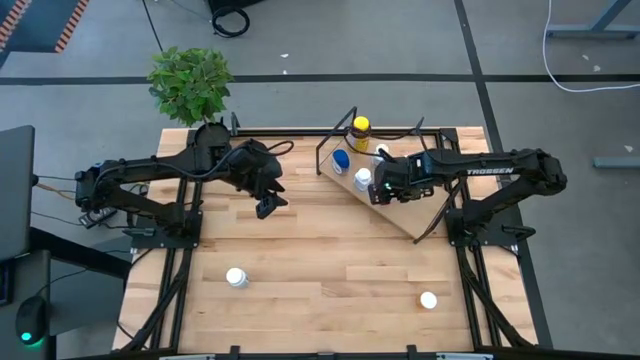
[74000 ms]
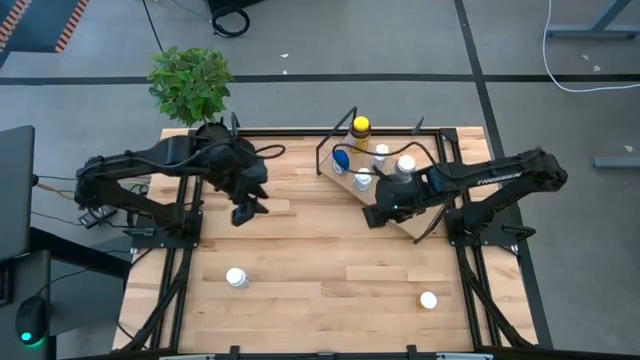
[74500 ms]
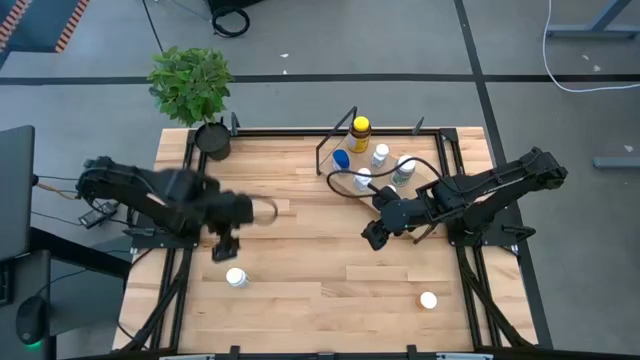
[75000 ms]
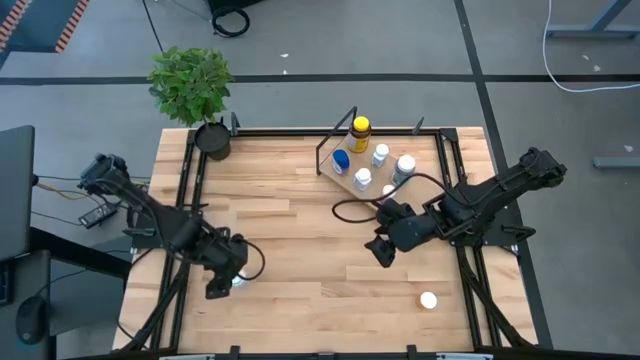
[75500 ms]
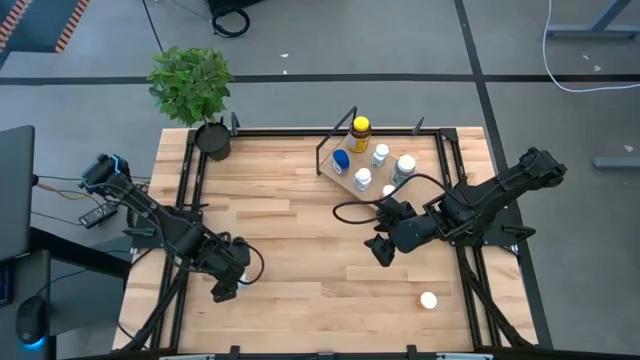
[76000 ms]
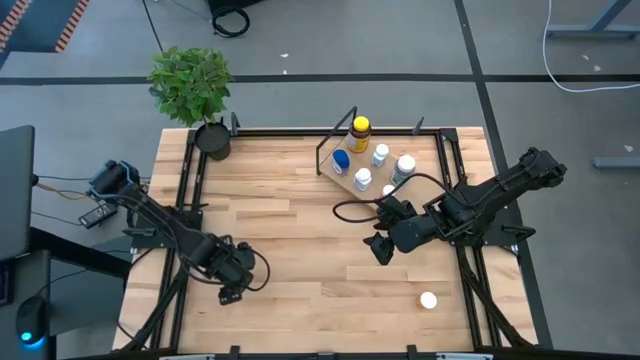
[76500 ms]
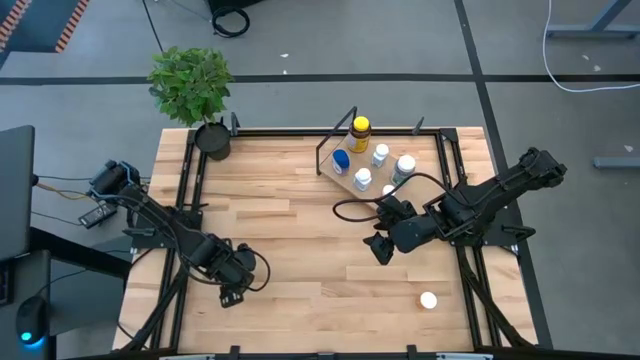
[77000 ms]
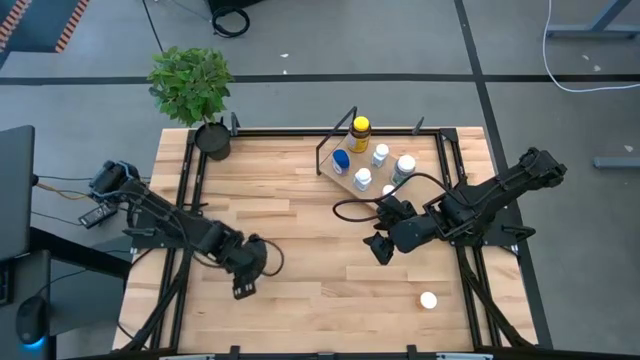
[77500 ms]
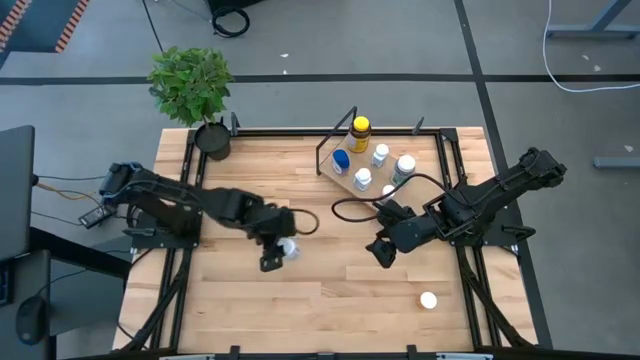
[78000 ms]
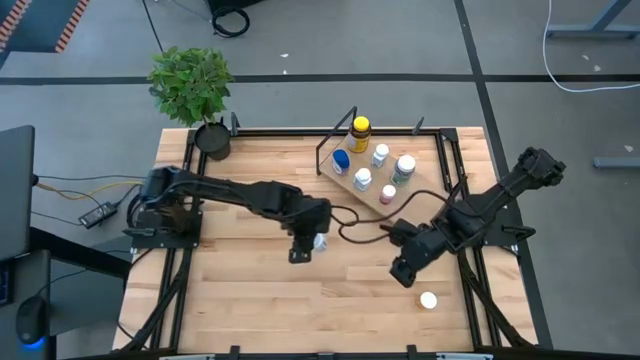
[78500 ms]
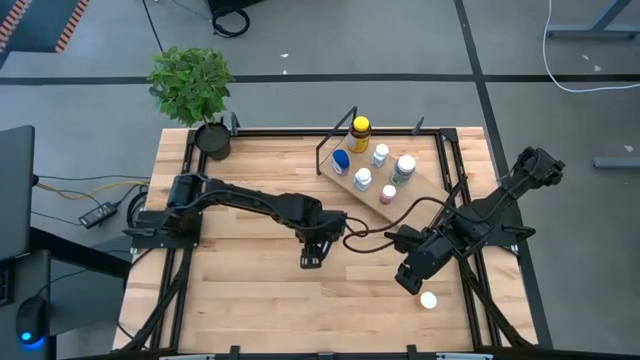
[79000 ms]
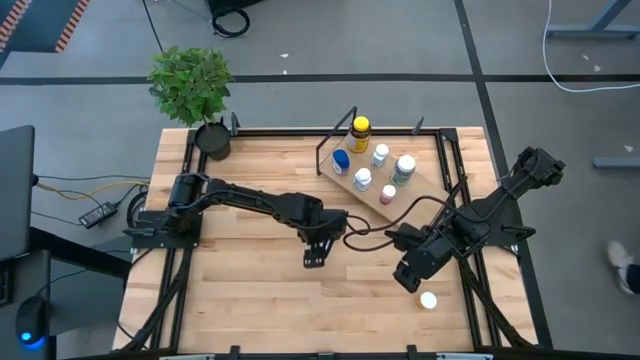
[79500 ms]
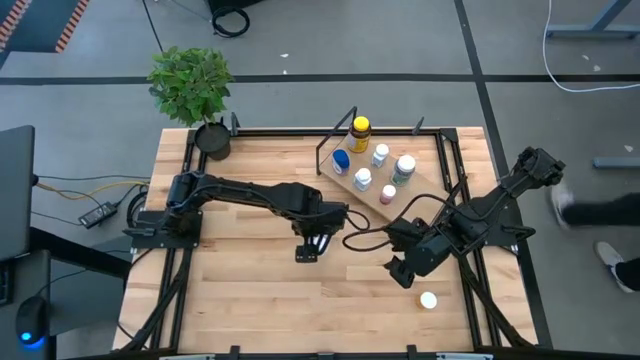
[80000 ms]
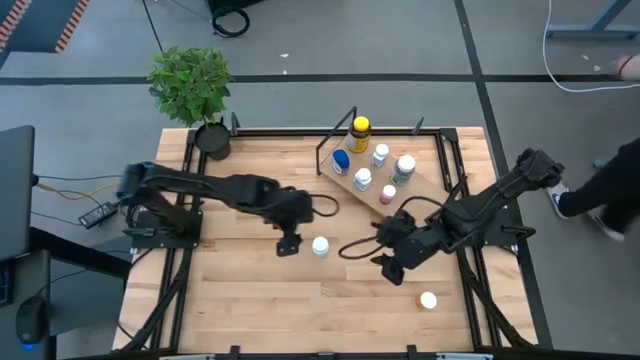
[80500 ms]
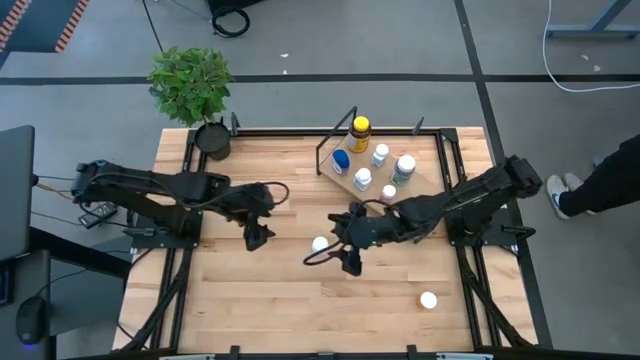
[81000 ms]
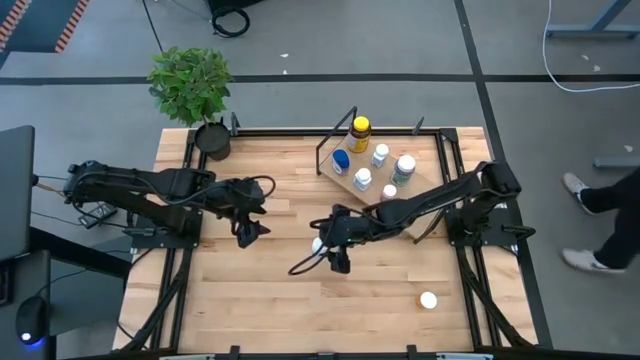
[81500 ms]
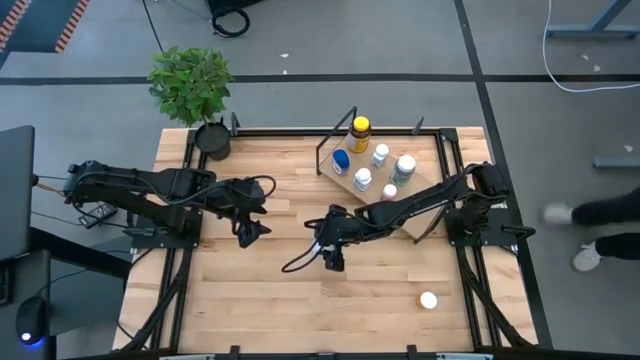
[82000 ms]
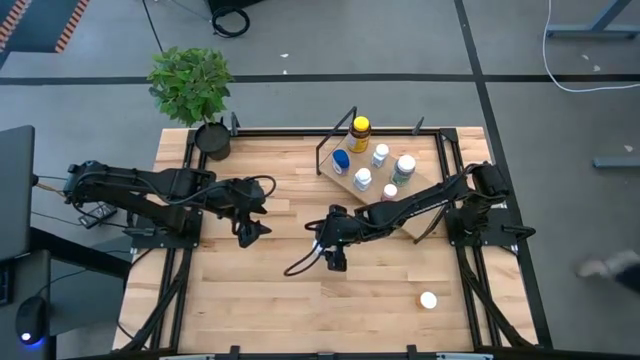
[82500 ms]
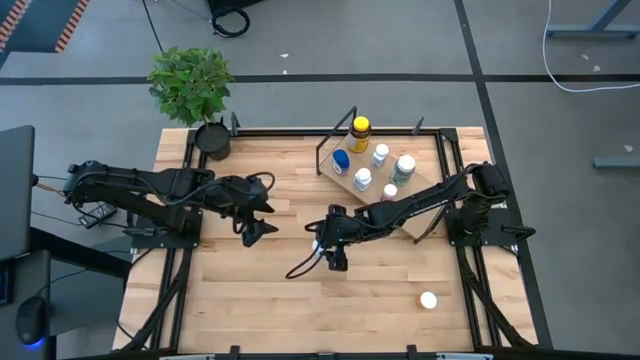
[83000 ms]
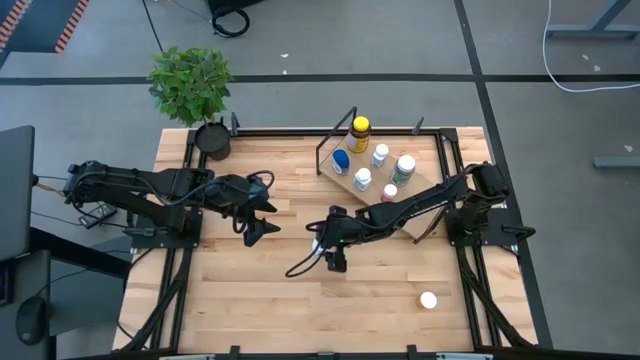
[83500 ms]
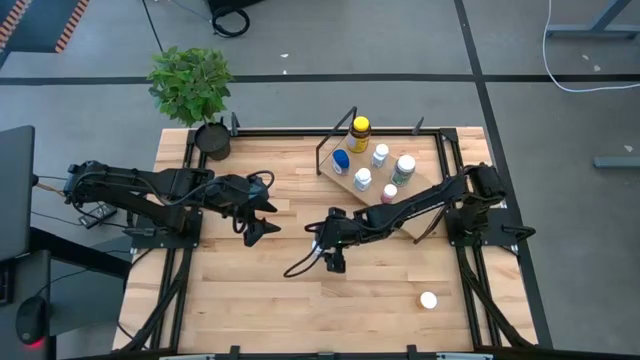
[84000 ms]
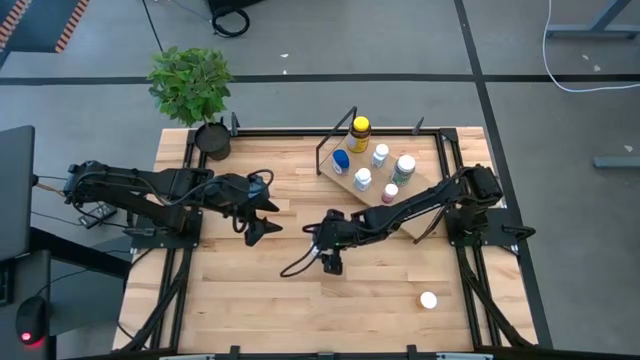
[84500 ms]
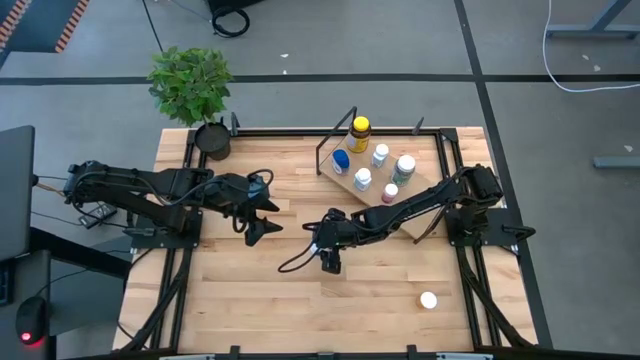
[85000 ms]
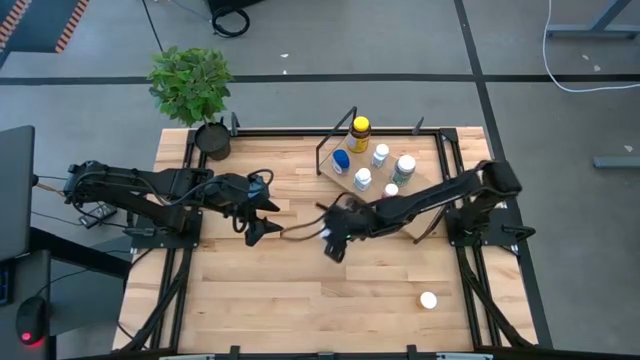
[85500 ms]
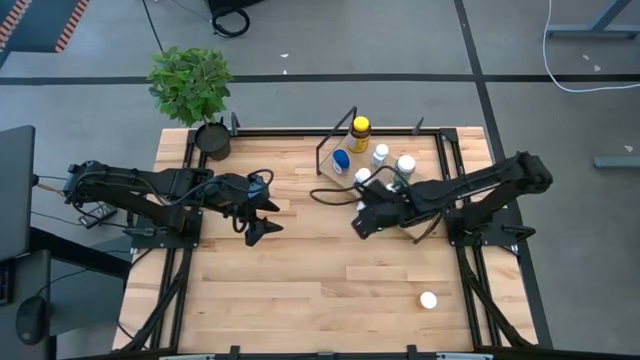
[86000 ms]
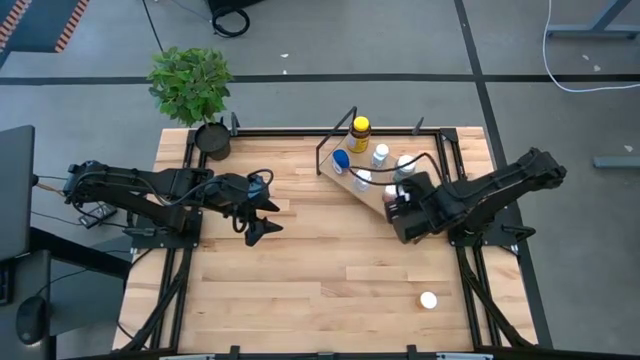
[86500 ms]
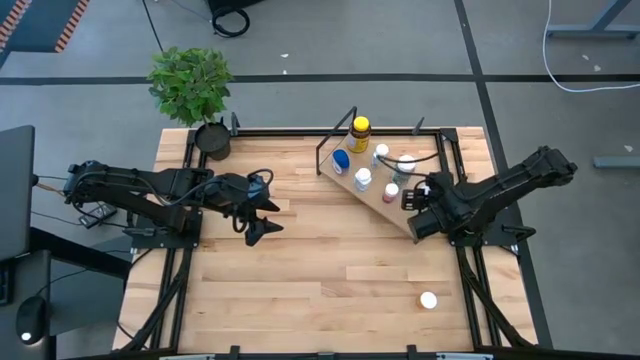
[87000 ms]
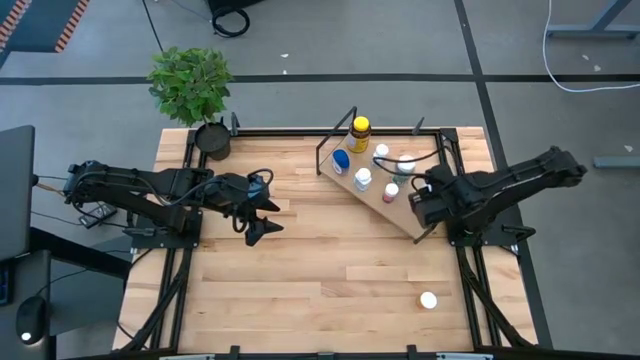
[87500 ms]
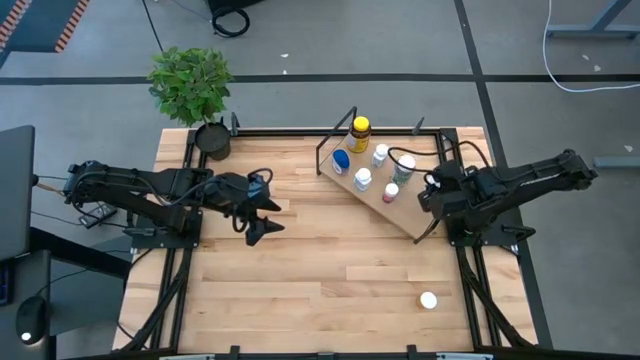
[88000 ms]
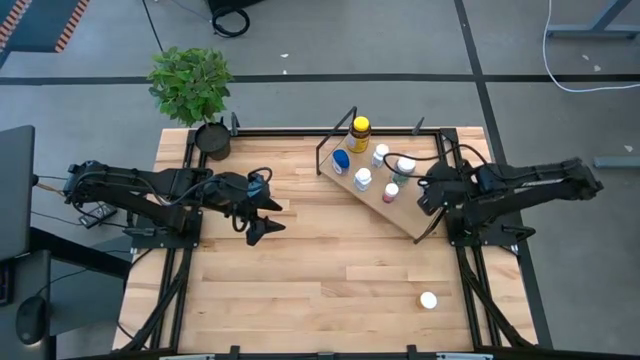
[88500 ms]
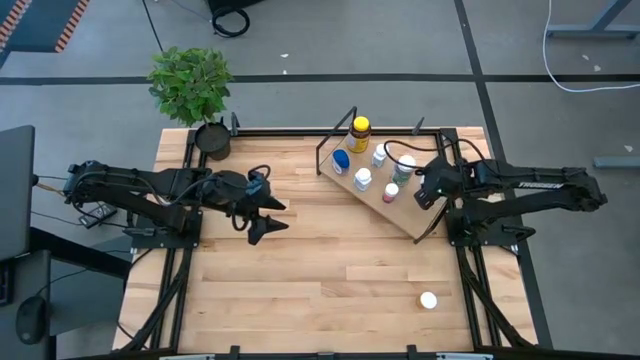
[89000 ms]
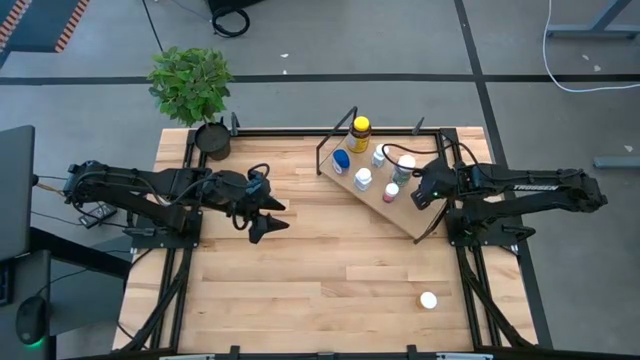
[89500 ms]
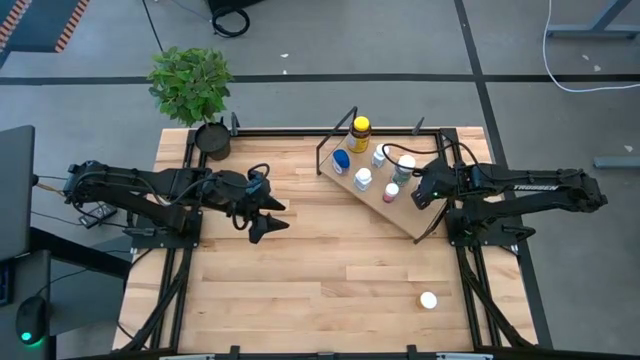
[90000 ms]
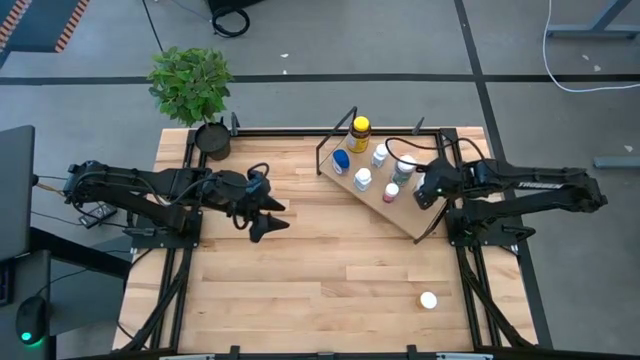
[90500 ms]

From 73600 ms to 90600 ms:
Task: Pick and place medicine bottles onto shelf by color
Put the white medicine bottle on the shelf

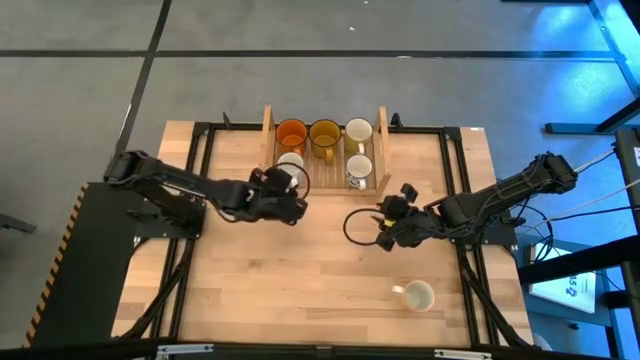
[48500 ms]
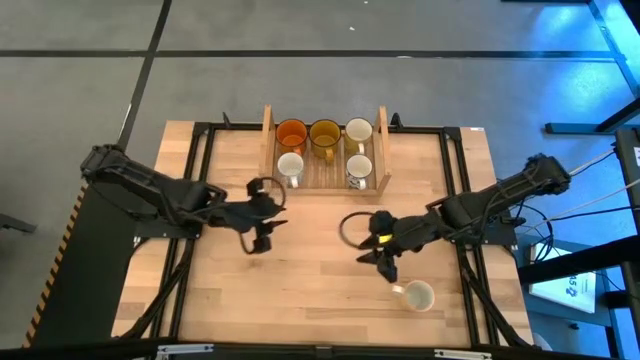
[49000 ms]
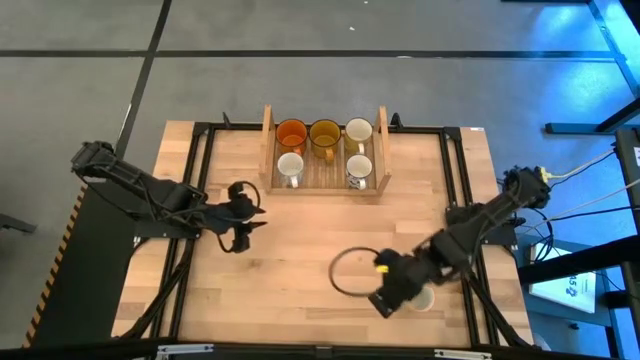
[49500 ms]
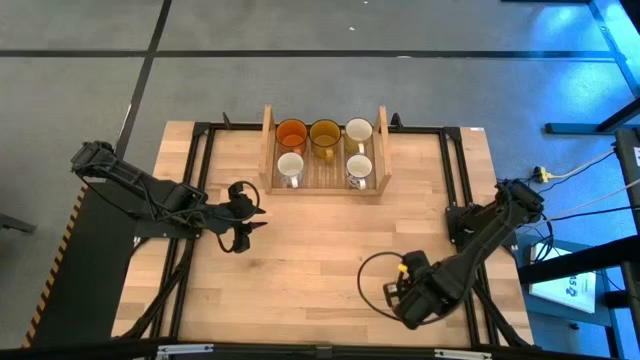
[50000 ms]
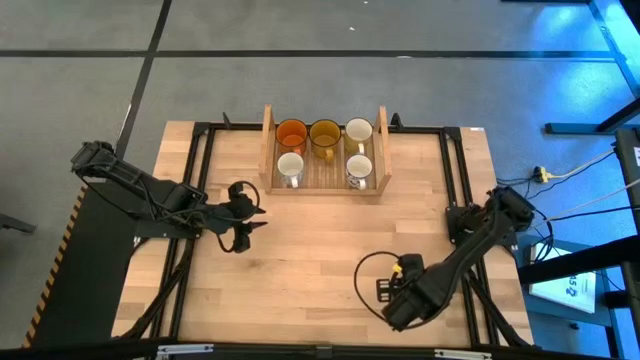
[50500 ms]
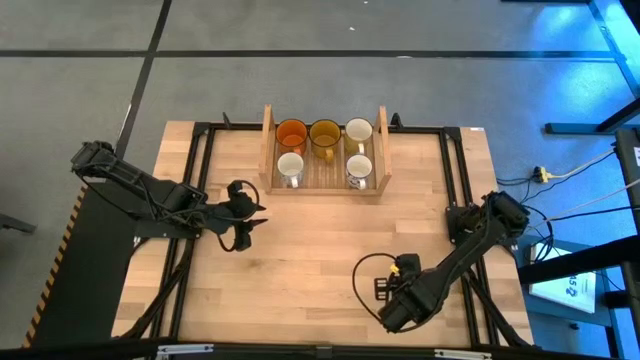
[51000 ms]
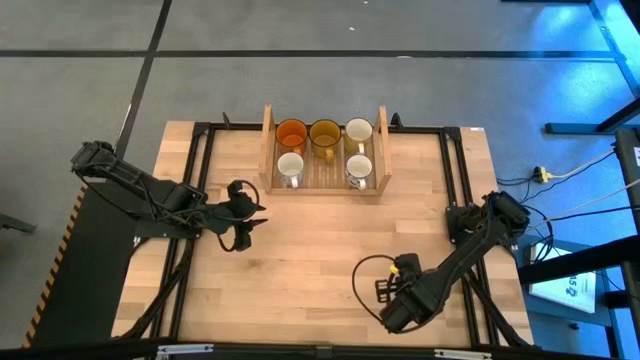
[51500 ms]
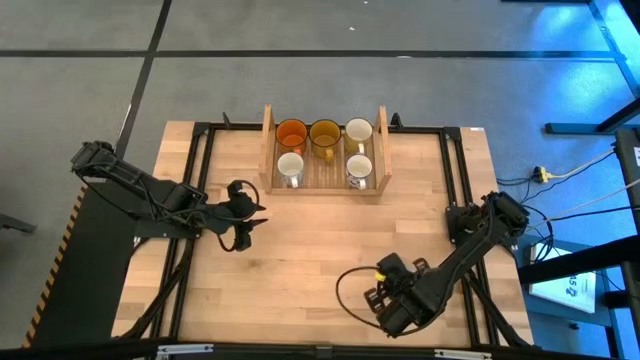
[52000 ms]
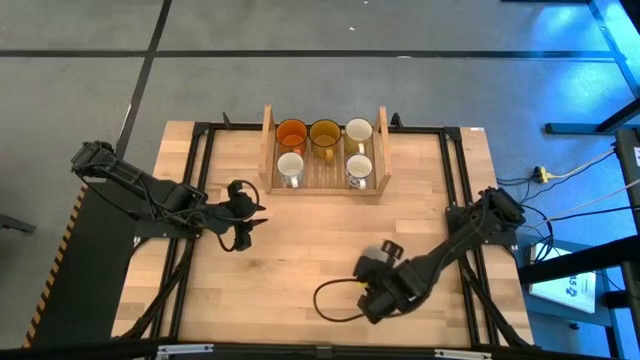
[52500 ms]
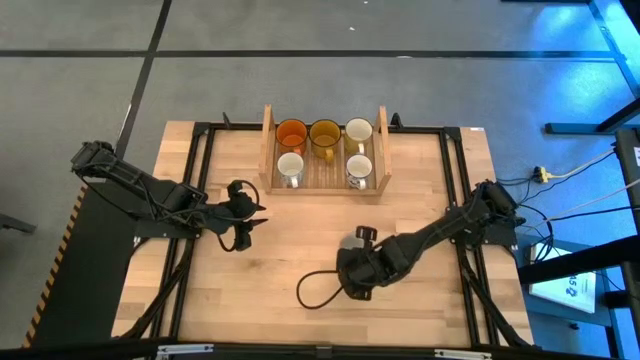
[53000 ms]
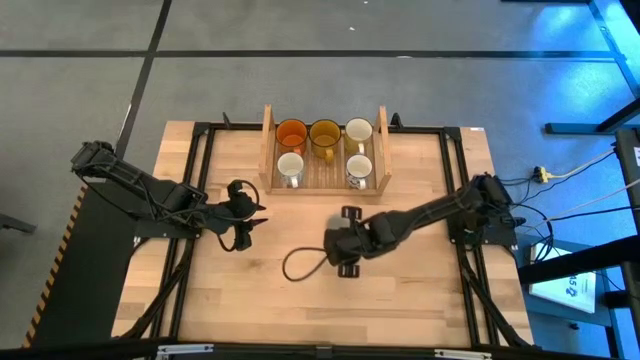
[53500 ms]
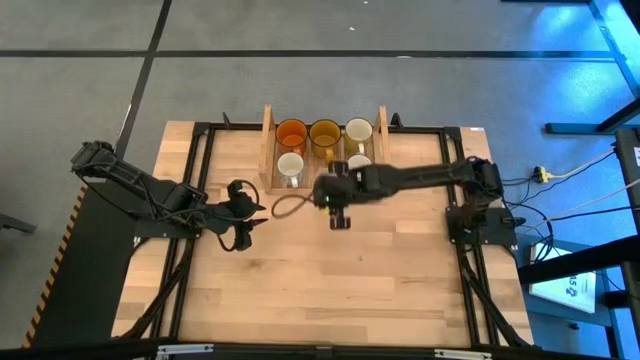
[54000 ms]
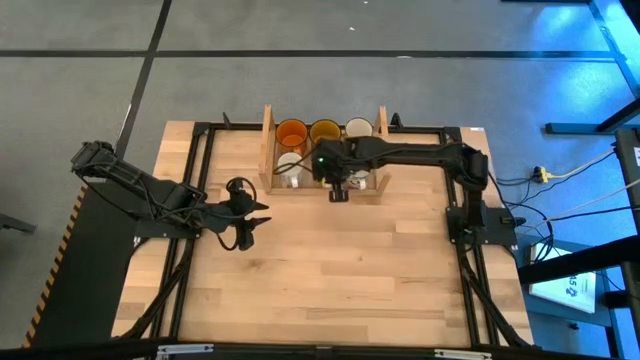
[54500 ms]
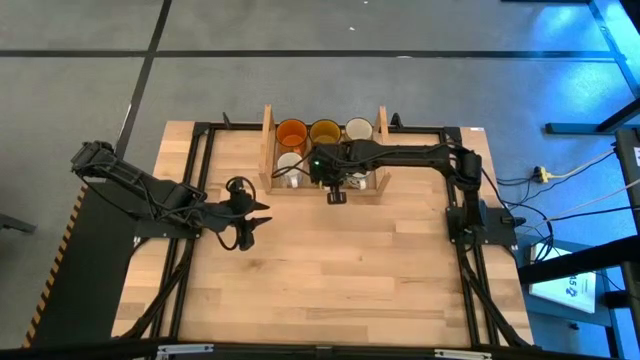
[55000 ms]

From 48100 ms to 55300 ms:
Task: Place coffee mugs
Put the light yellow mug on the shelf
